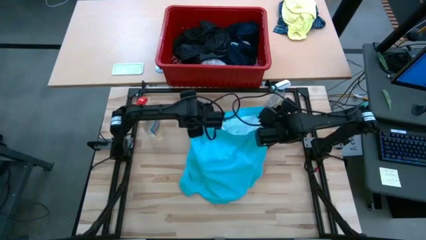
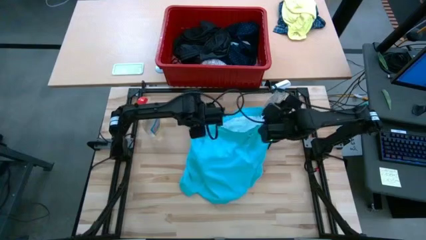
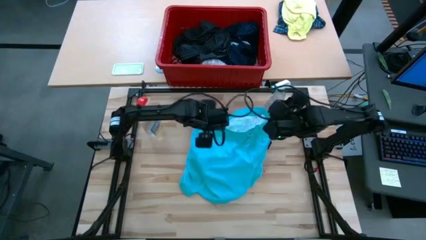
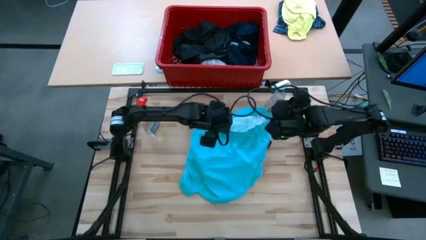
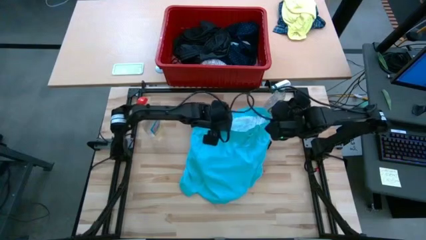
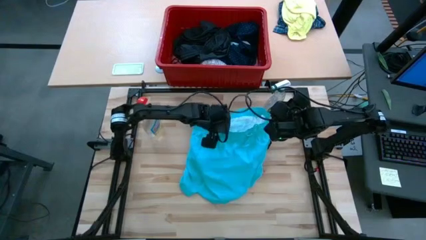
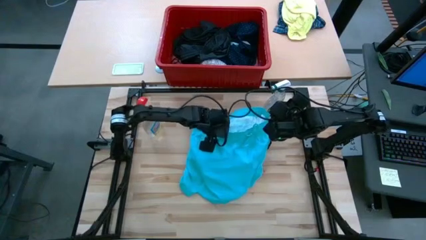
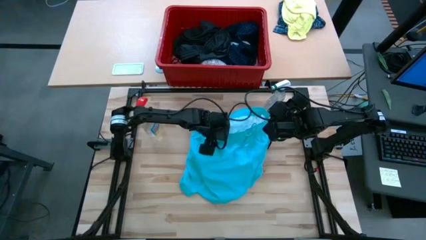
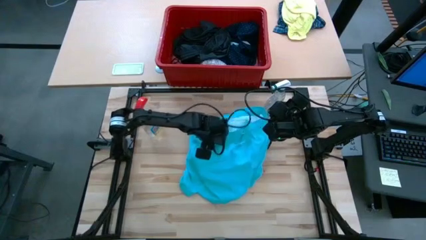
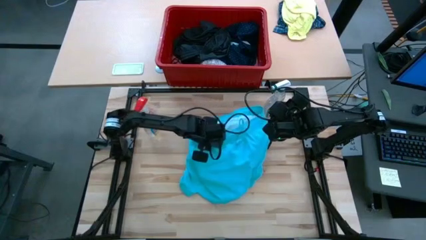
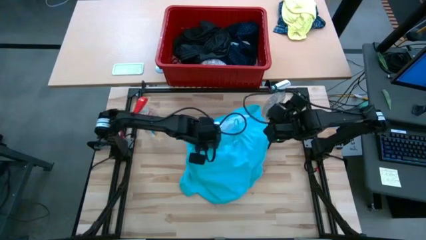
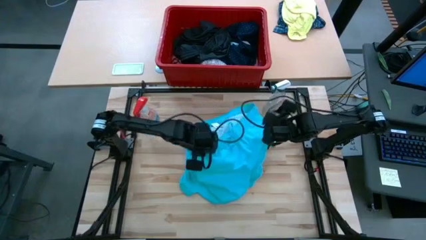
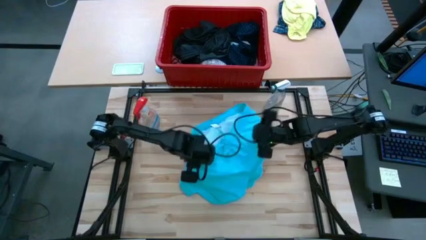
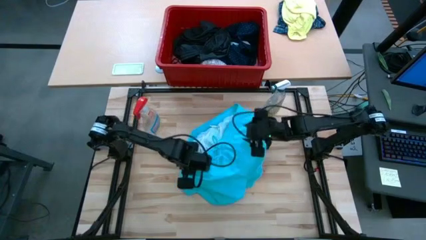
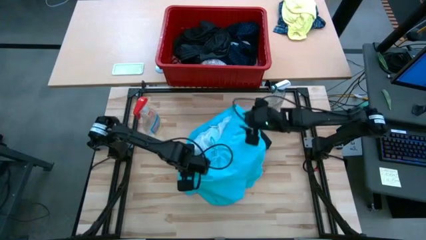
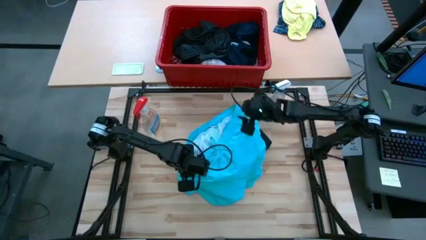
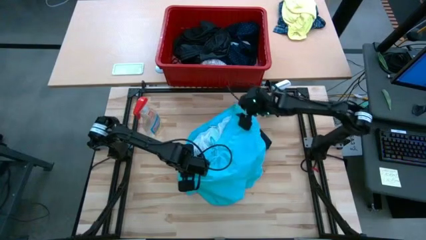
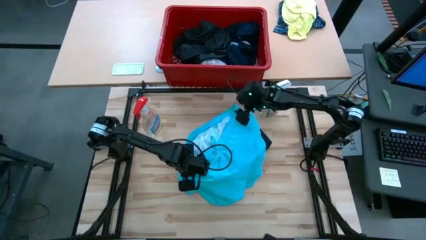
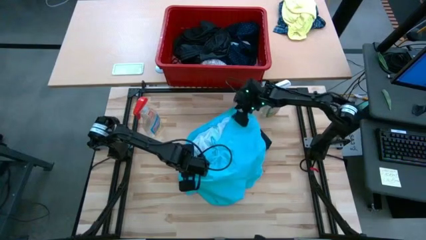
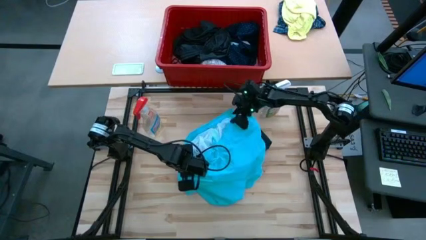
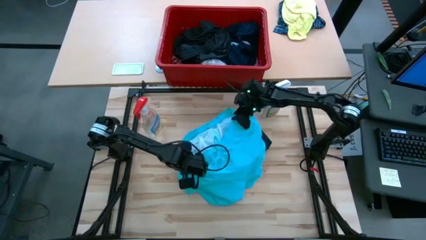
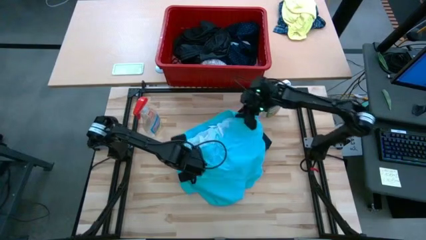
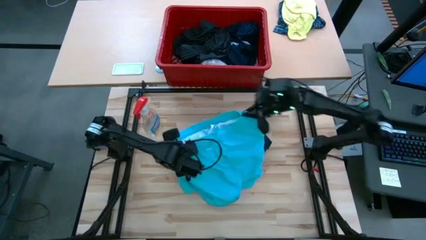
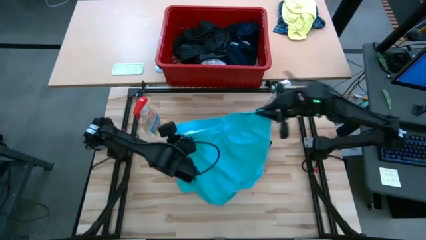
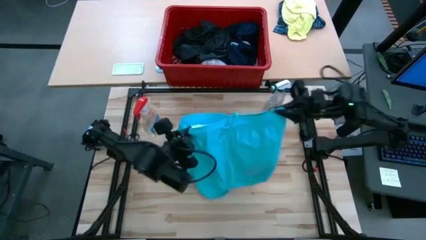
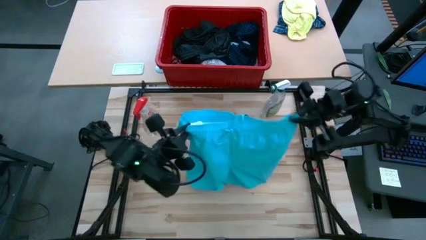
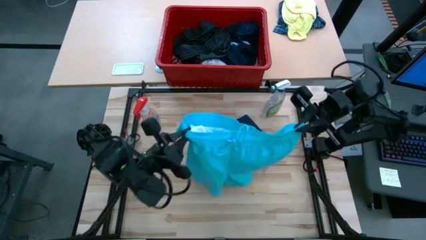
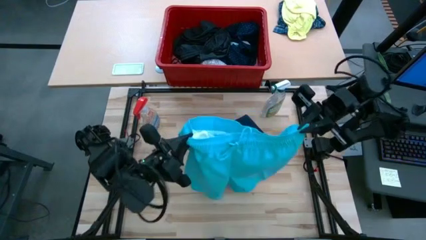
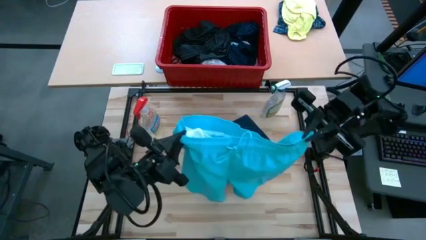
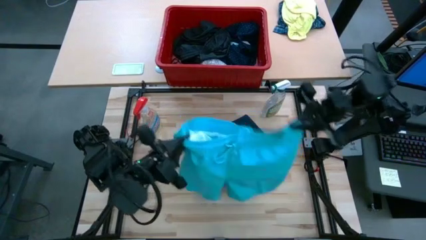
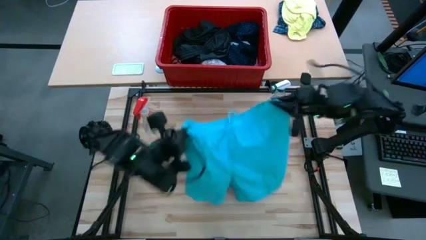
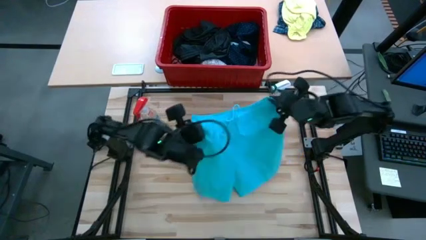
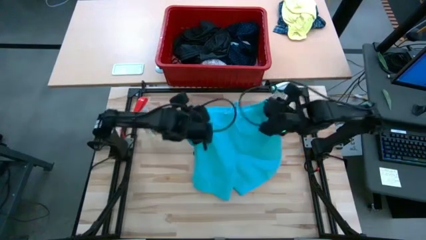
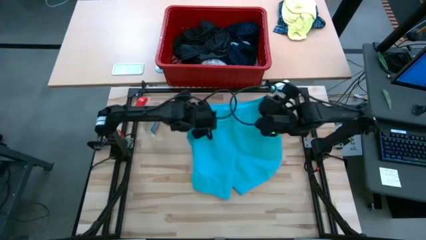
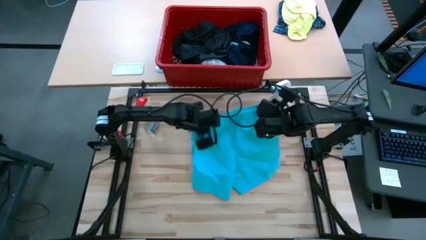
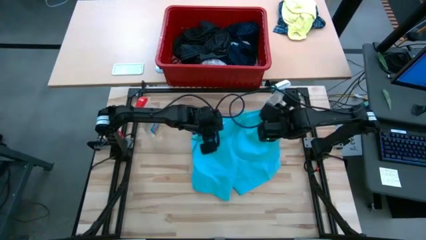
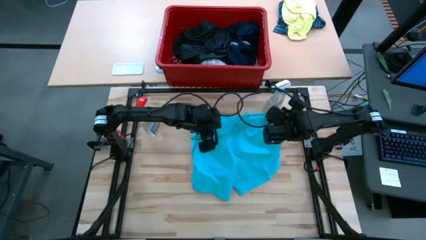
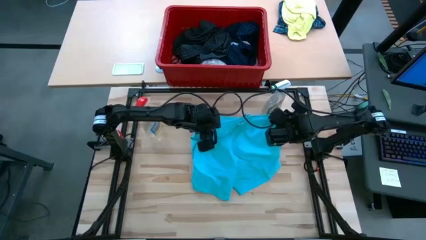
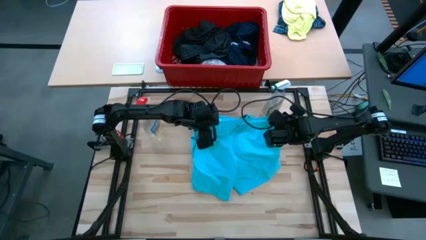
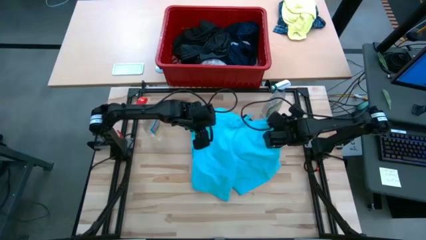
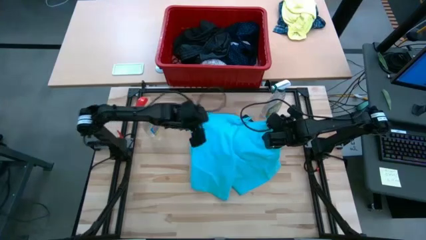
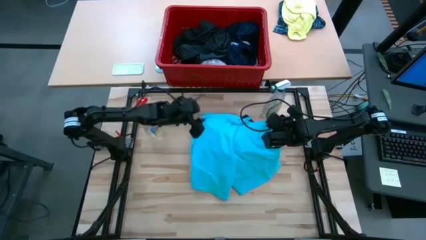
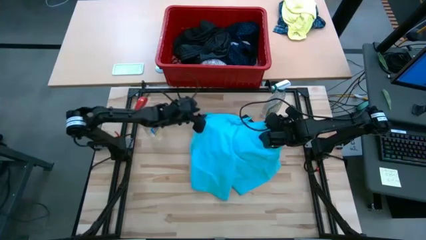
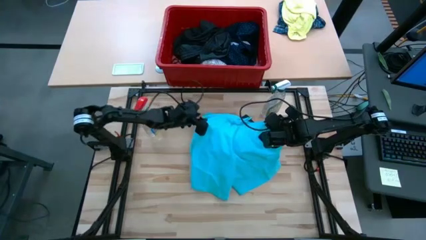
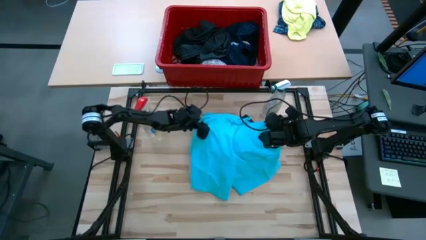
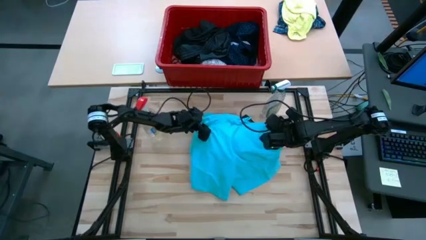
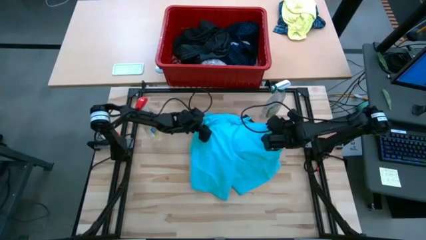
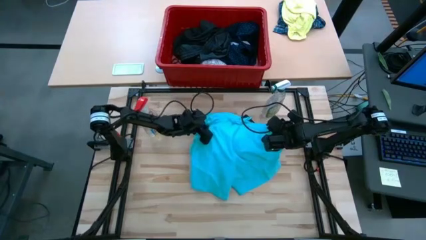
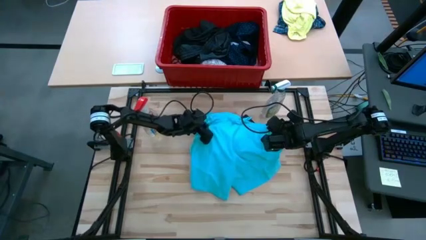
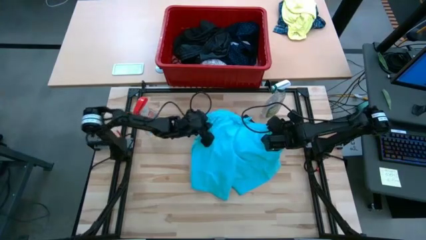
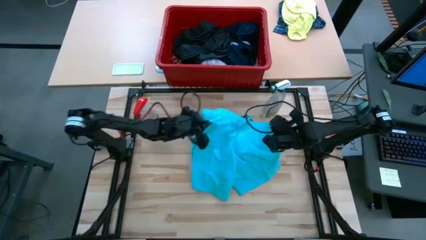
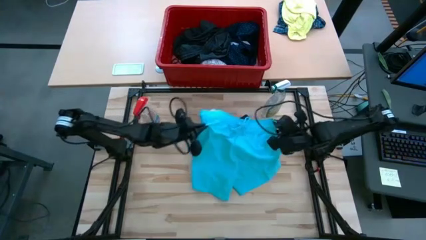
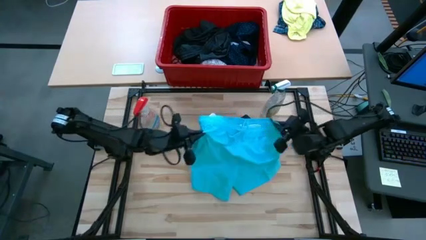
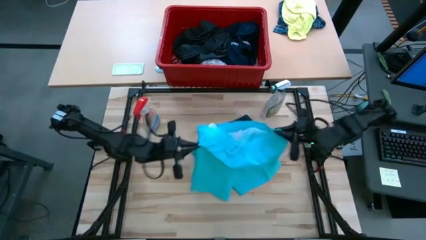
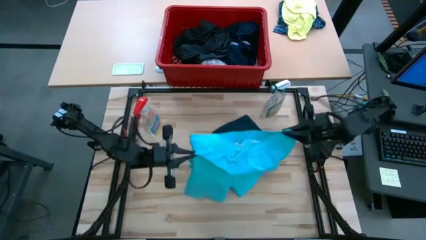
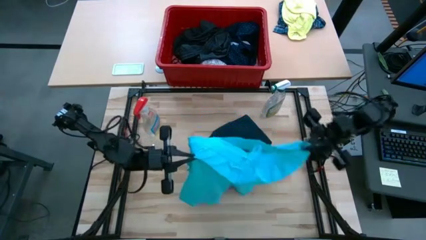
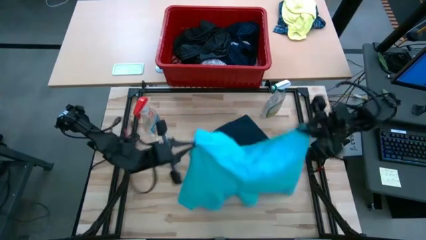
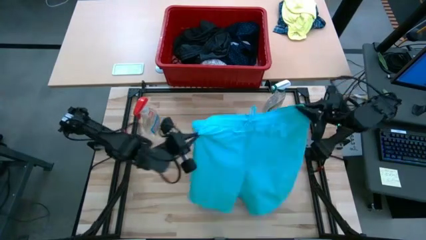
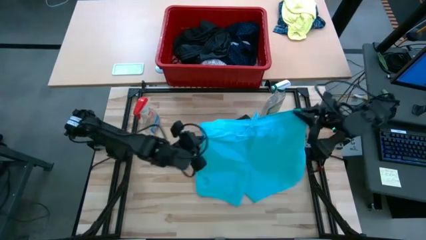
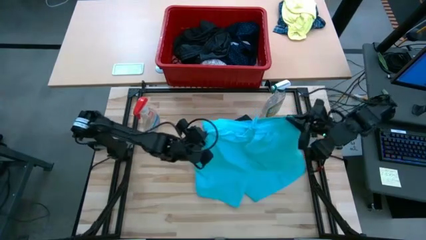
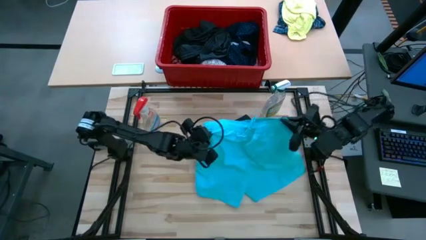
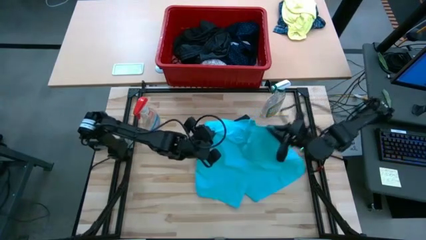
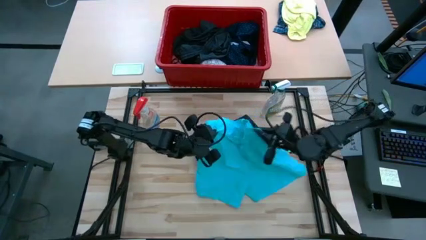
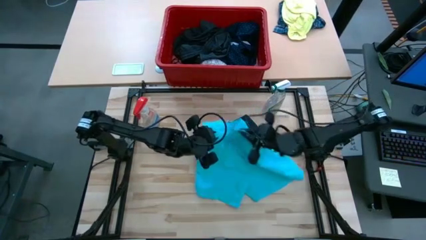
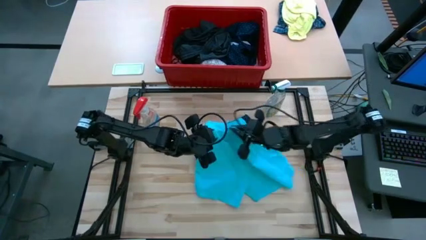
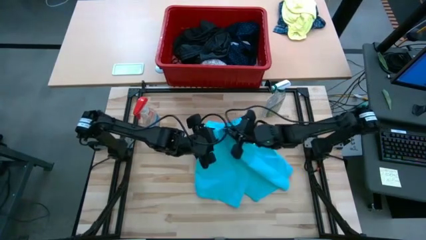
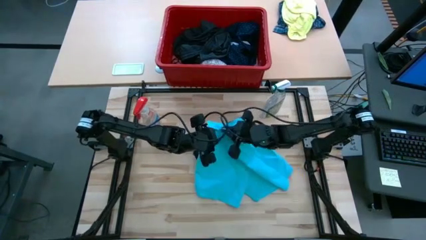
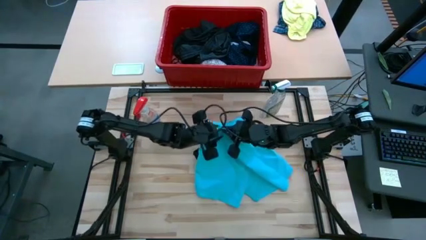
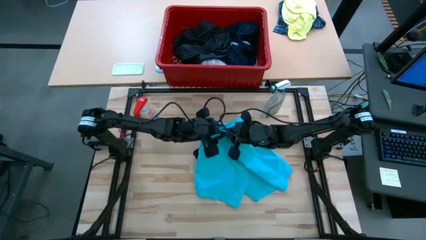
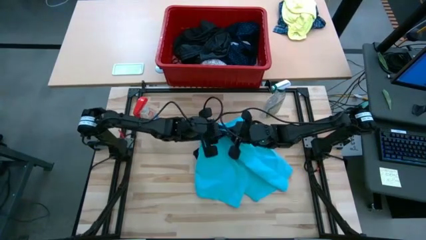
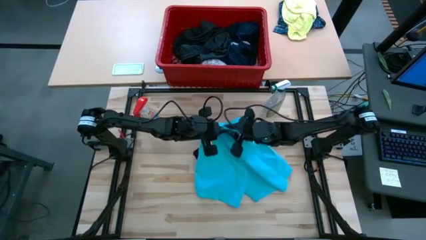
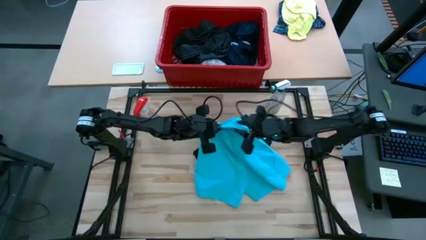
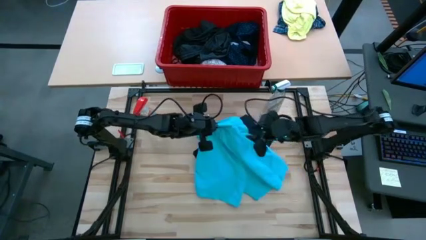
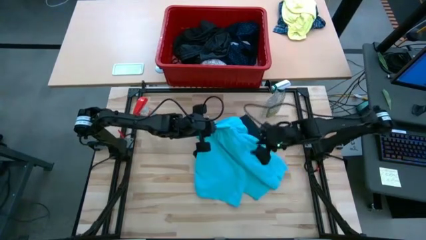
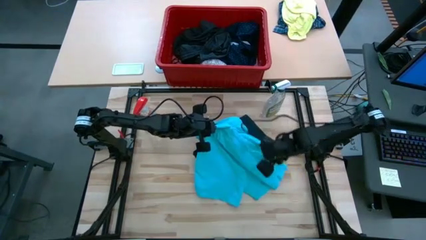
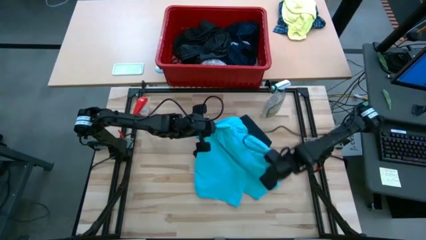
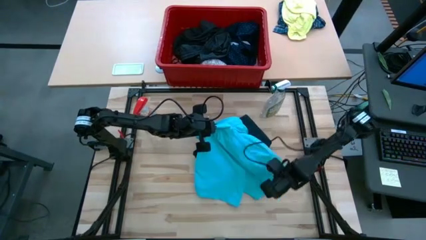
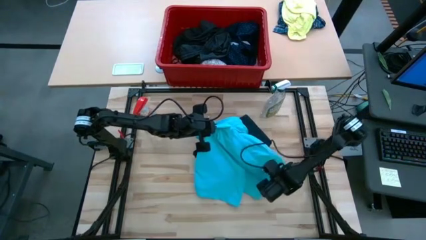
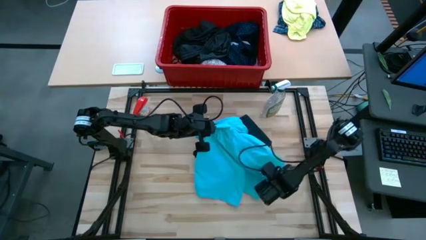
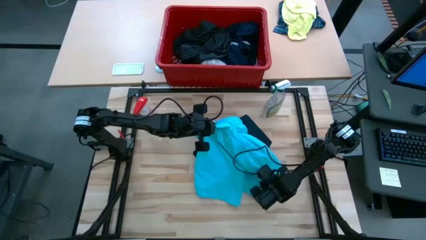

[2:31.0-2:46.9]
Task: Fold Laundry from Bin
Fold the light blue shorts
